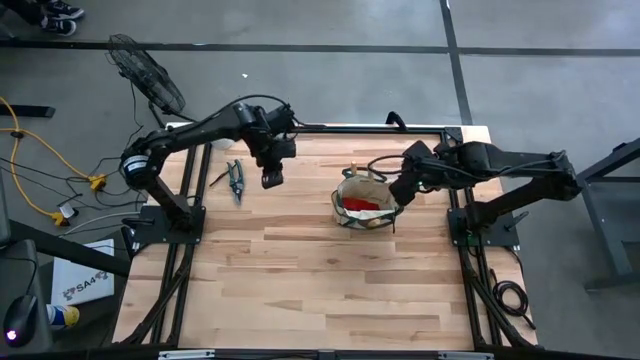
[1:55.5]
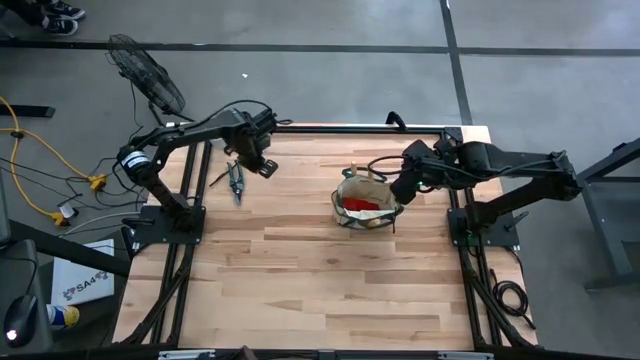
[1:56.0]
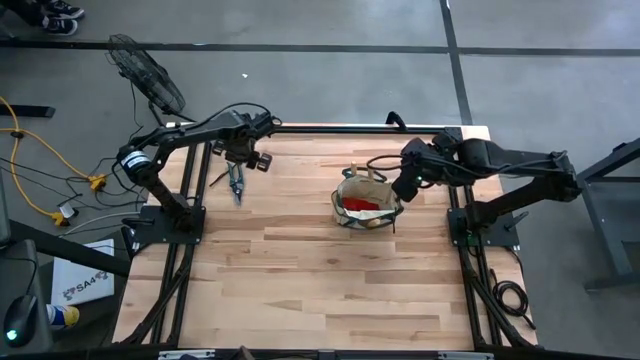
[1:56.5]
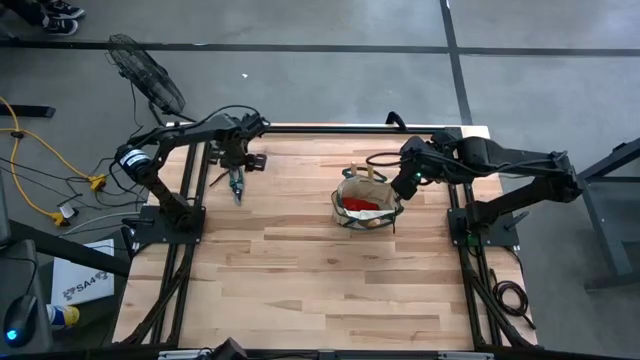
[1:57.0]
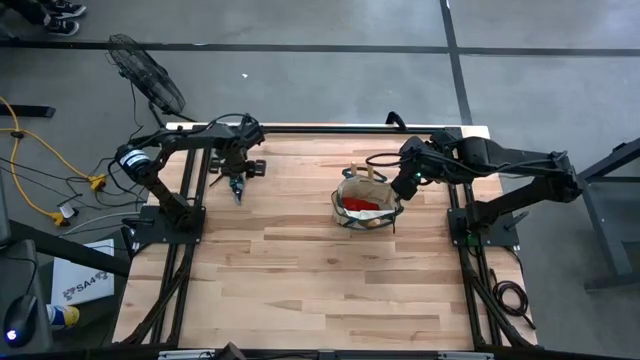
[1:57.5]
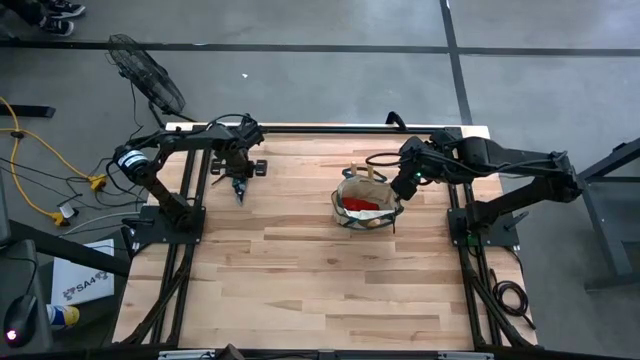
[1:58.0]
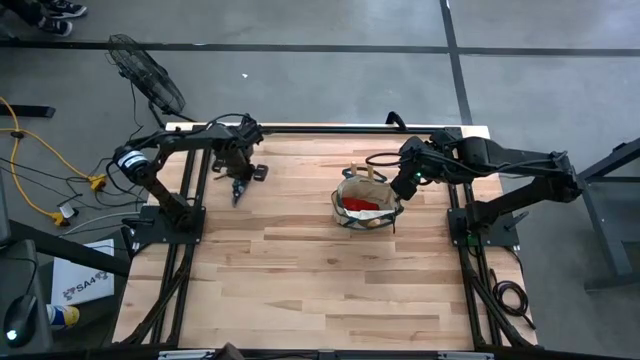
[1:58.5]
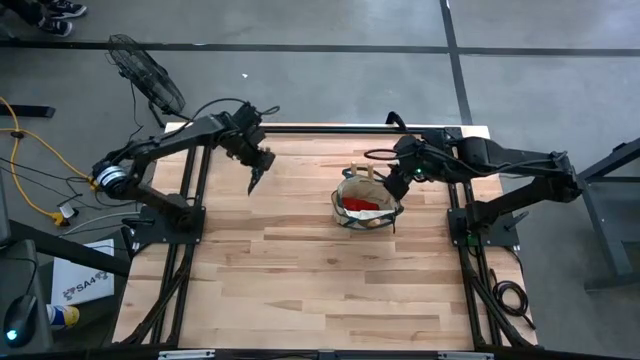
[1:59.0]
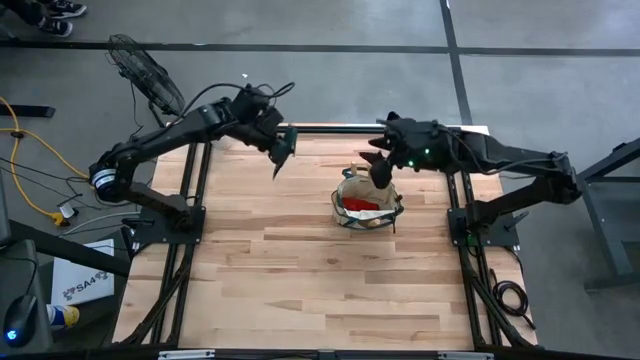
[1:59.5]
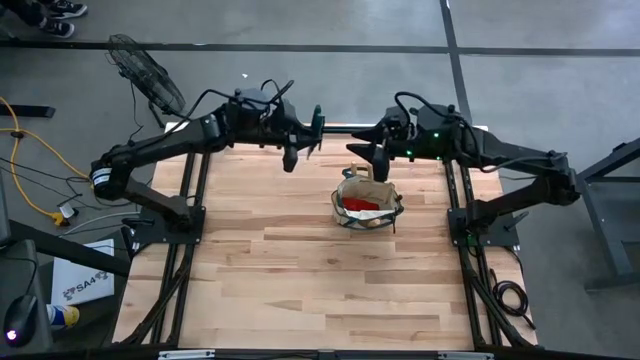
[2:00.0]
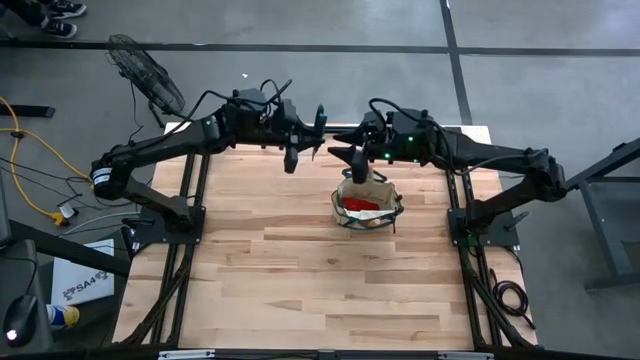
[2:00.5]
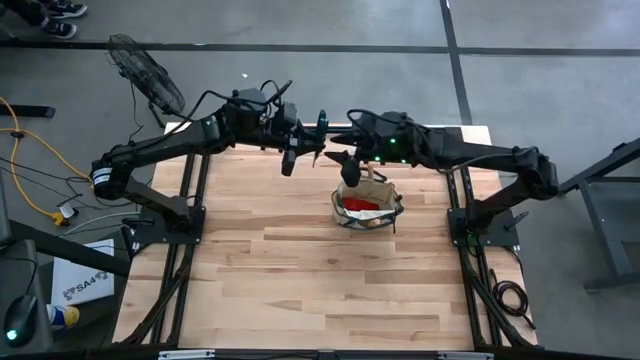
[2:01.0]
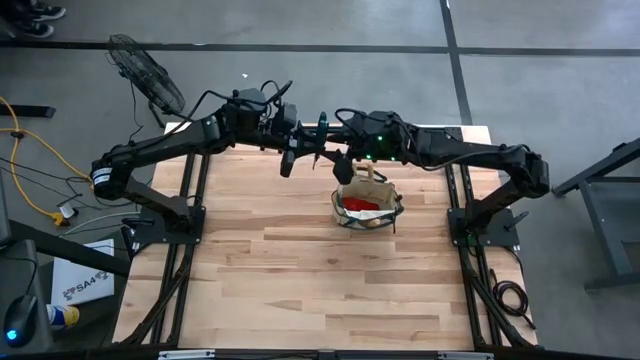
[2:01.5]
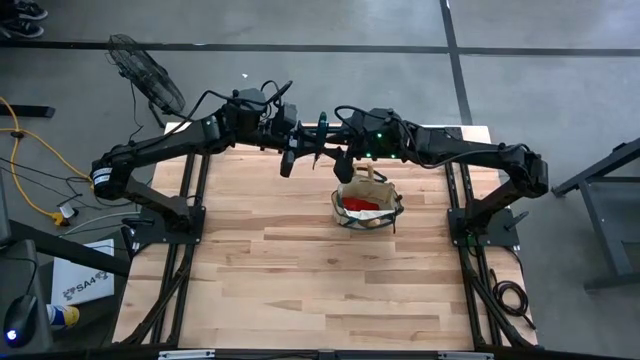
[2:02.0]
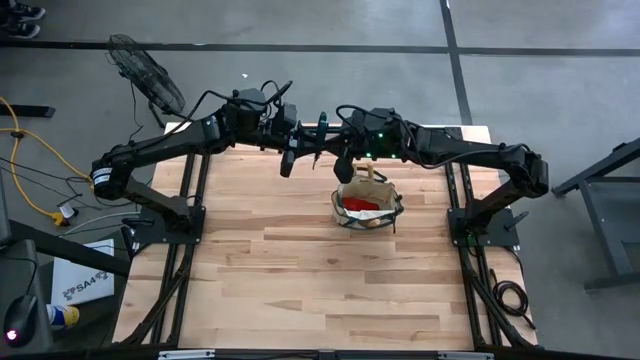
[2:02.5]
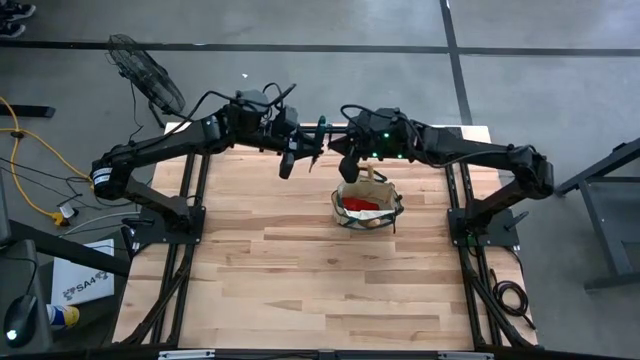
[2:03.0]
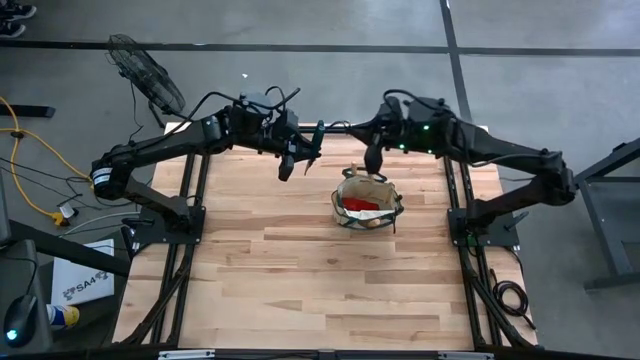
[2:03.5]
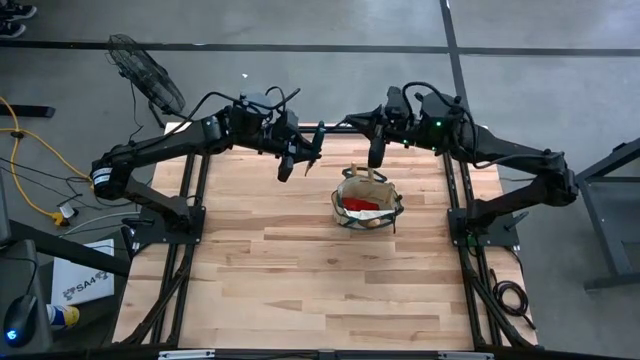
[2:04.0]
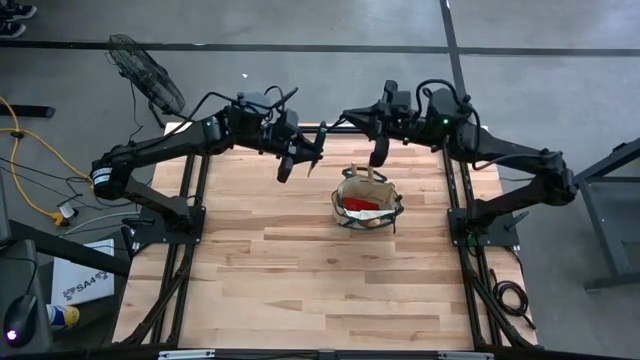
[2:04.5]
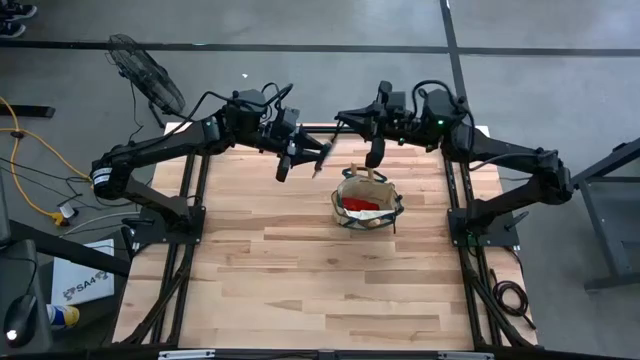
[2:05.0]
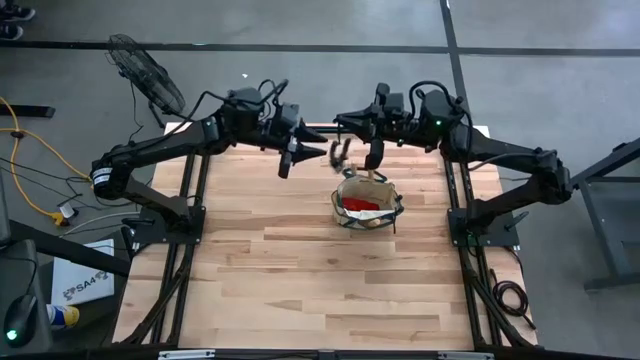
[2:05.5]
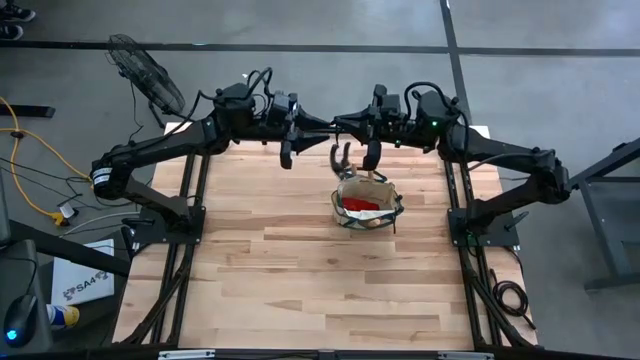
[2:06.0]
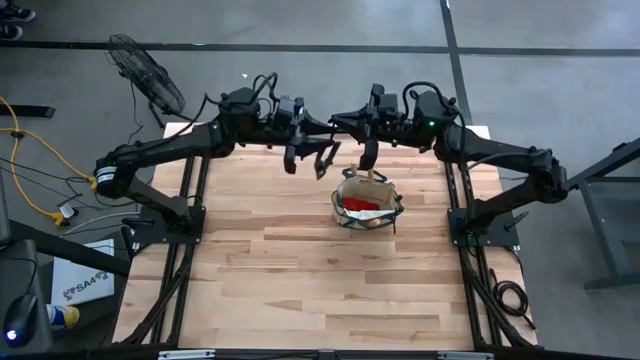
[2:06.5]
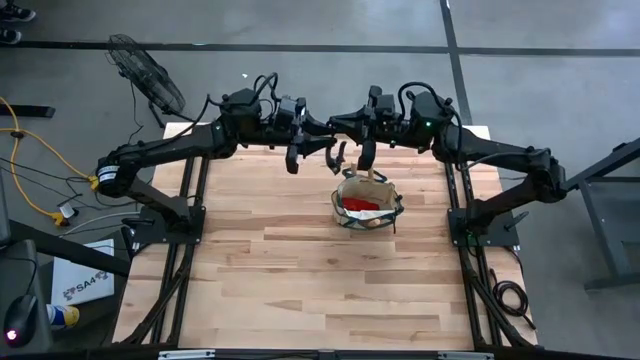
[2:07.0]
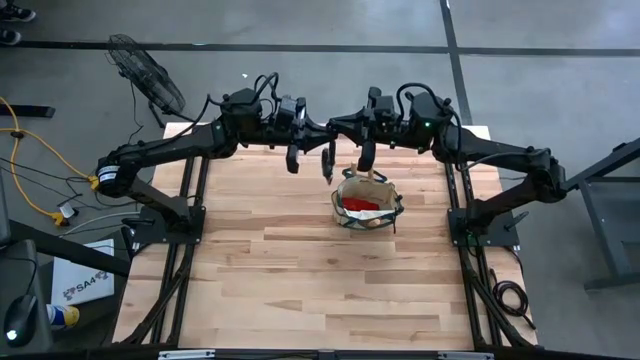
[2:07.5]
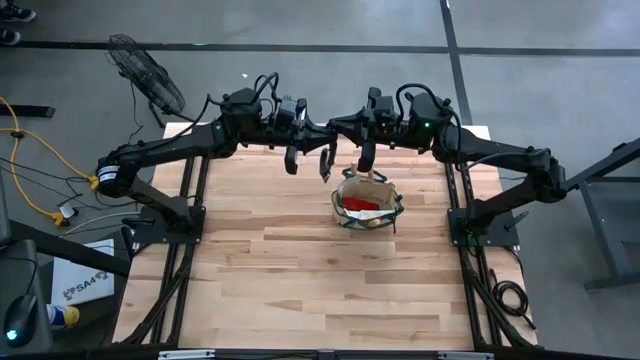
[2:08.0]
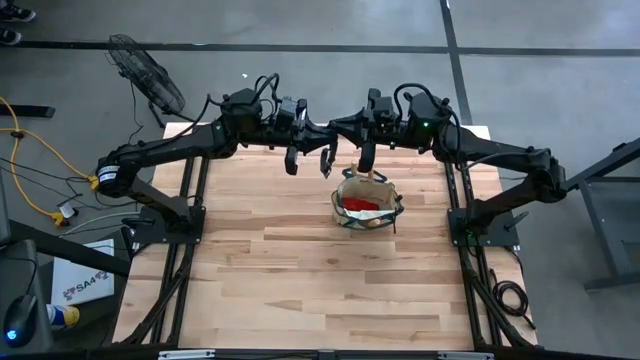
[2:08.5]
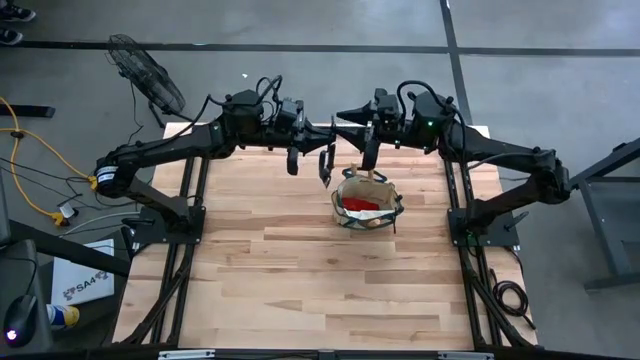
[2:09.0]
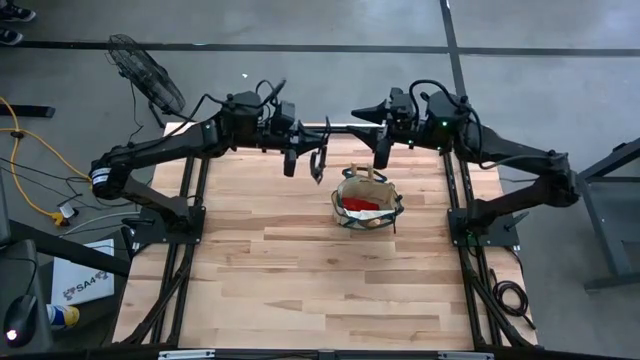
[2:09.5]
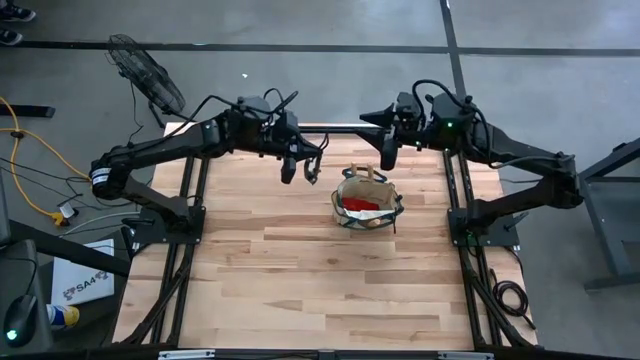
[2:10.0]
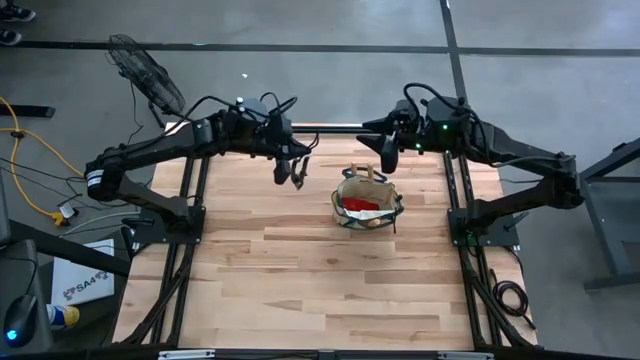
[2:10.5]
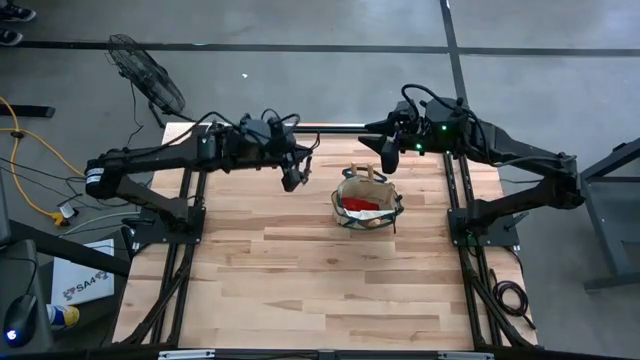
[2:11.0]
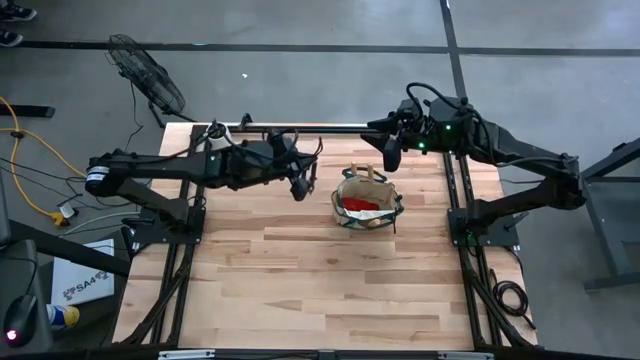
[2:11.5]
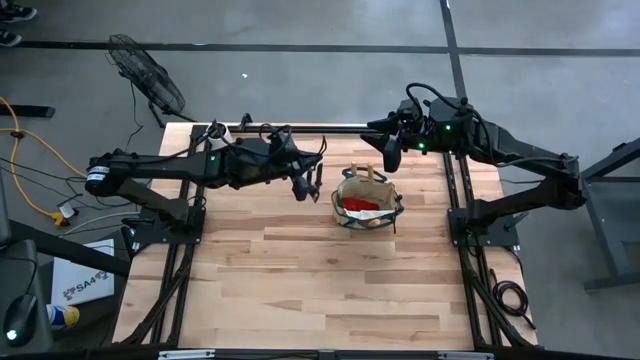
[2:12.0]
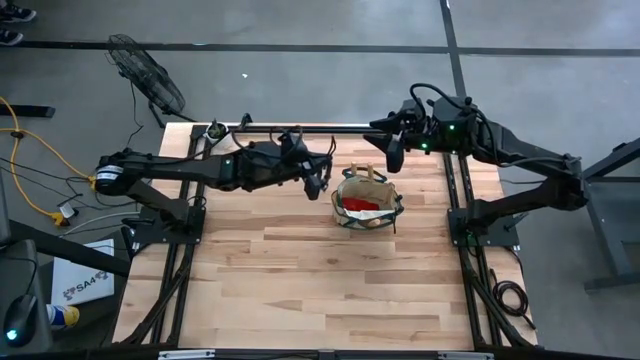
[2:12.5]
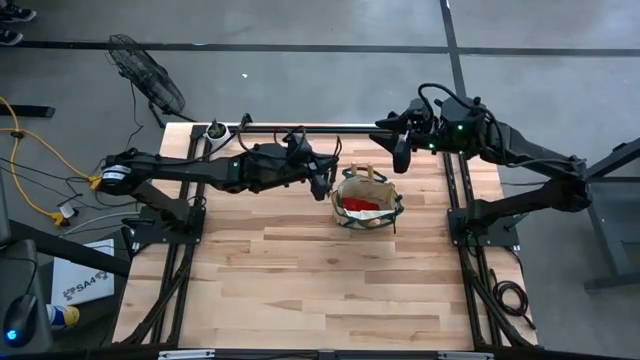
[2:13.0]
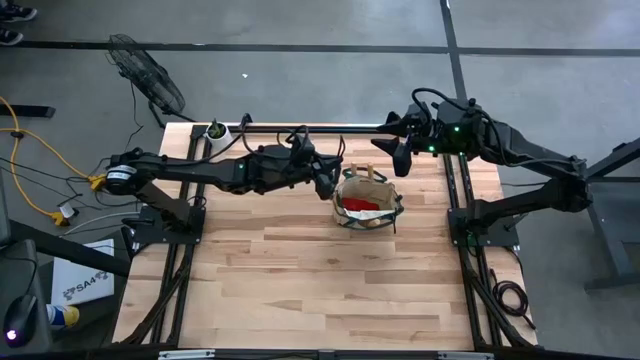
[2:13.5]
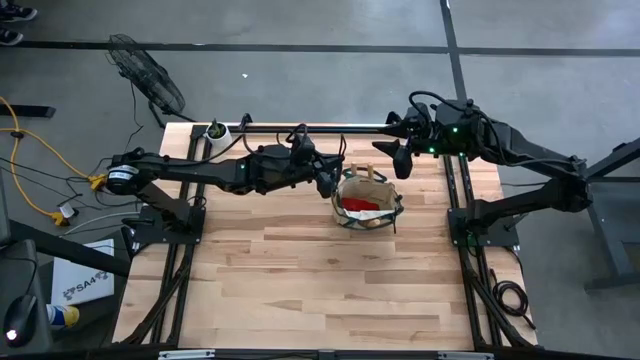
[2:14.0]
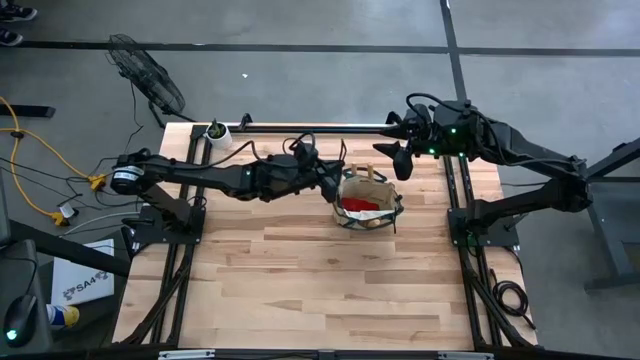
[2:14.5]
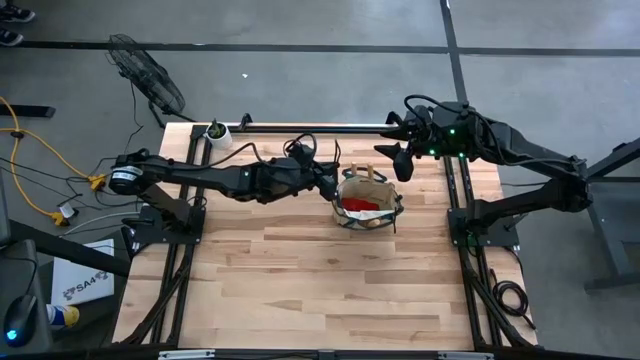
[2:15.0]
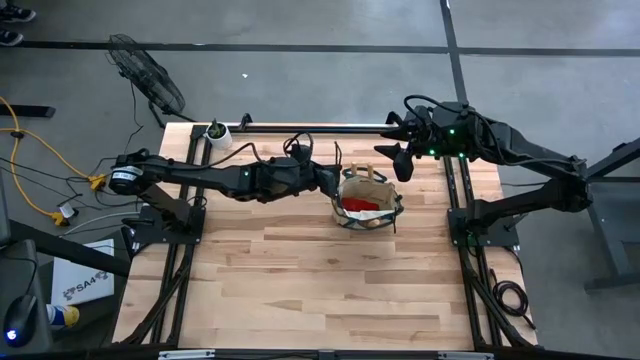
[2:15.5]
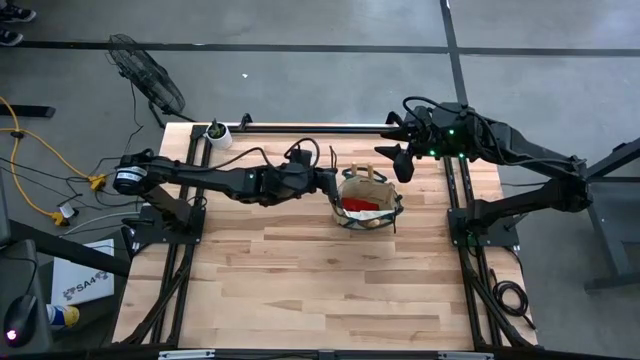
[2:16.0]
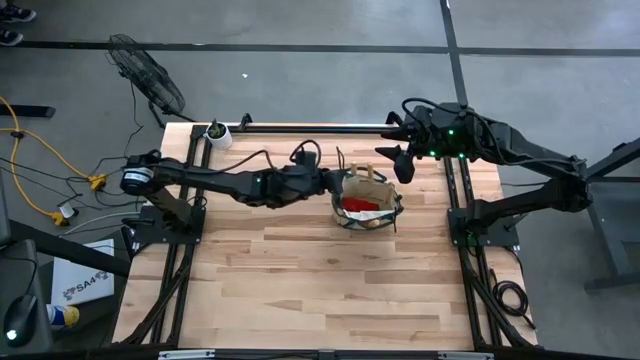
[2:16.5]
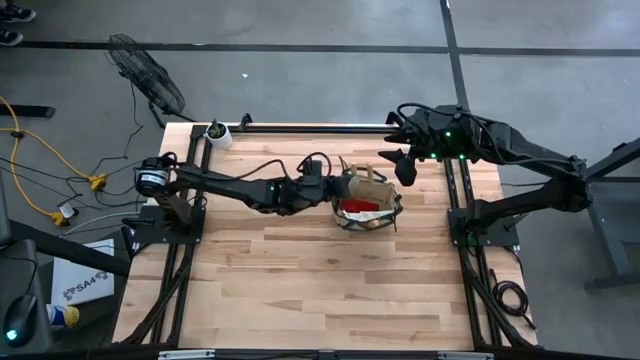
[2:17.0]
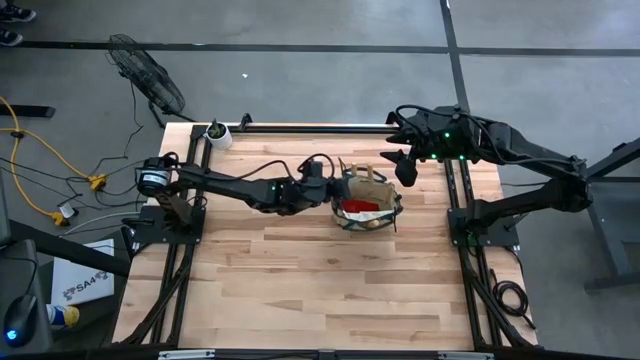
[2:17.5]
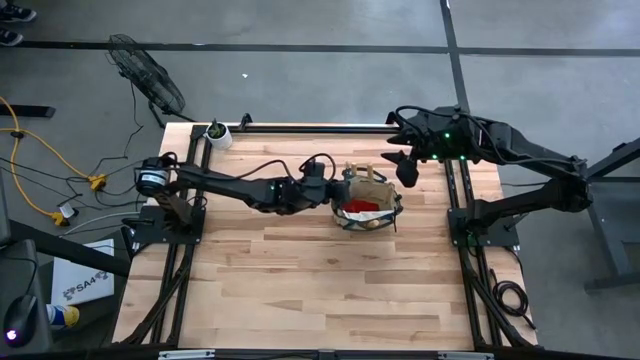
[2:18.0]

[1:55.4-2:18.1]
Task: Pick & Place Garden tools in Gardening bag
Put the shear scissors into the gardening bag
